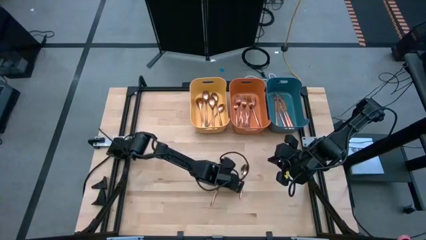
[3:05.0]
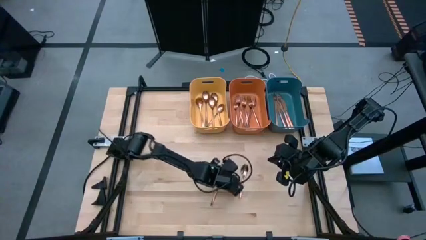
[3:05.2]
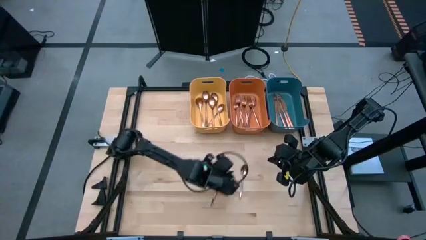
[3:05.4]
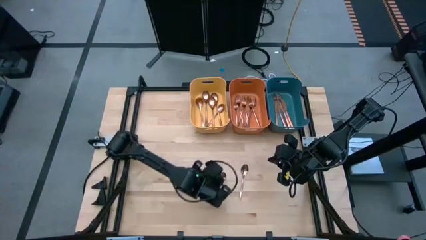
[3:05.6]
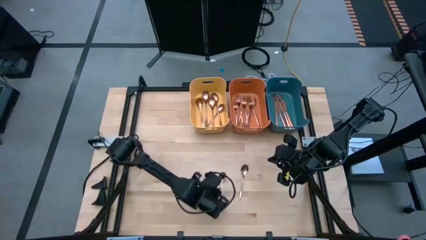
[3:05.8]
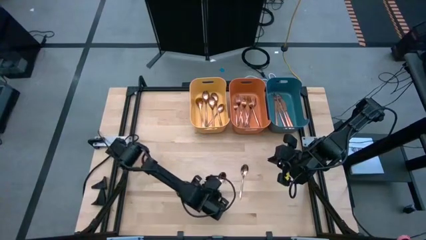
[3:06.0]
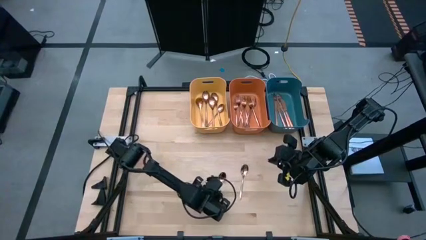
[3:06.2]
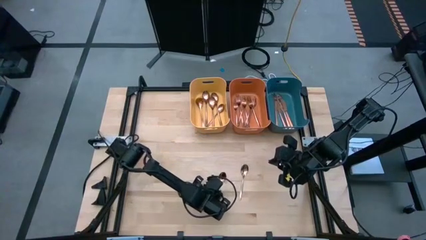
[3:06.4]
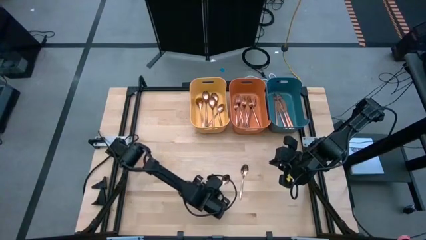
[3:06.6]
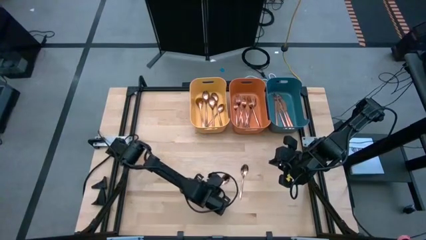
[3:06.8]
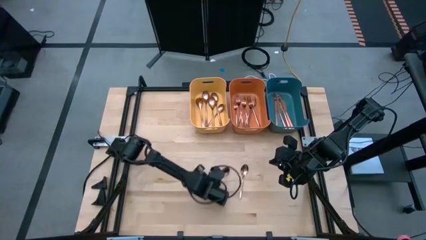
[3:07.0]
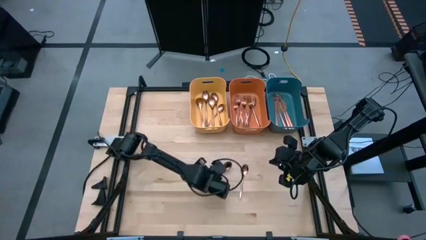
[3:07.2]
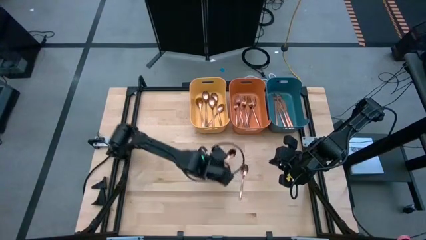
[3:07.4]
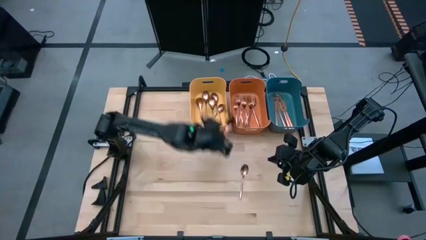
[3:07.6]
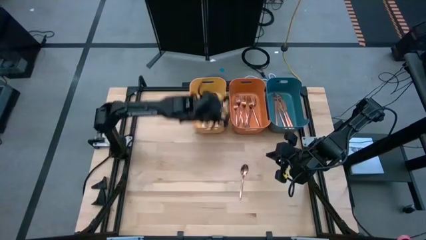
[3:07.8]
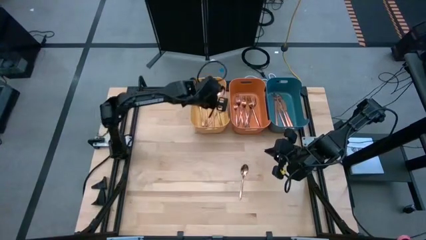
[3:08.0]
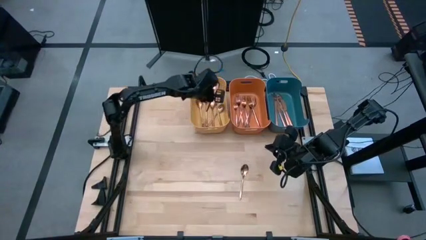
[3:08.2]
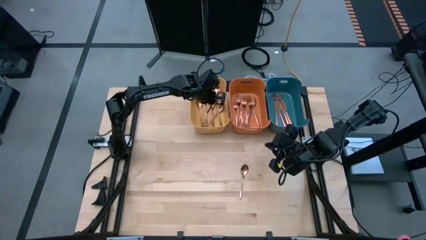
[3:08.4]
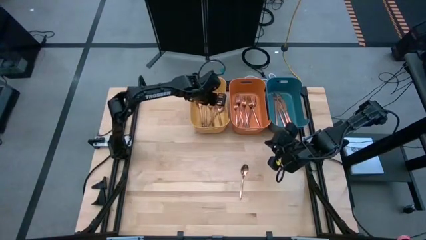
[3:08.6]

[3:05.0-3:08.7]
Task: Sort silverware
Put the copper spoon into the yellow bin

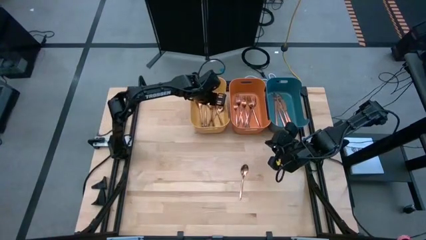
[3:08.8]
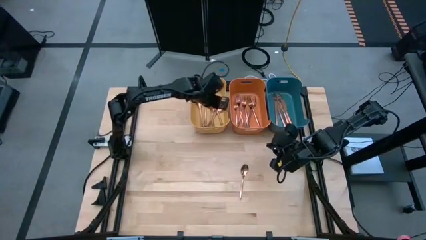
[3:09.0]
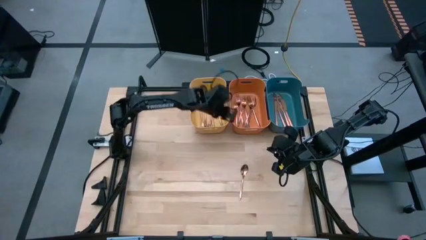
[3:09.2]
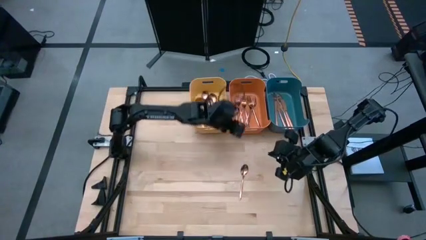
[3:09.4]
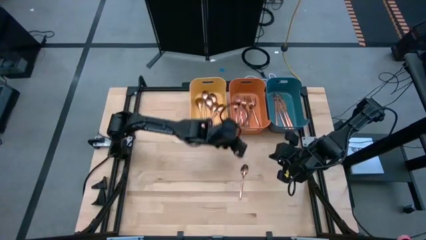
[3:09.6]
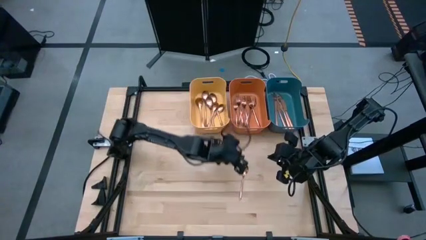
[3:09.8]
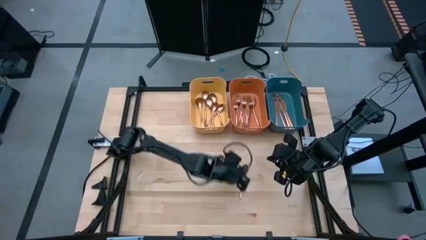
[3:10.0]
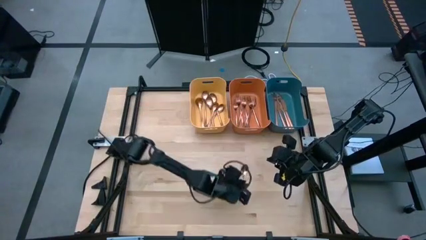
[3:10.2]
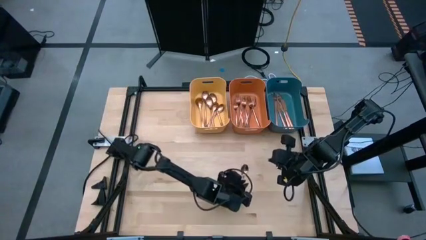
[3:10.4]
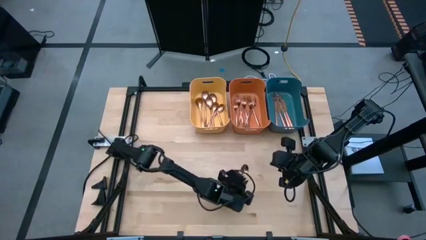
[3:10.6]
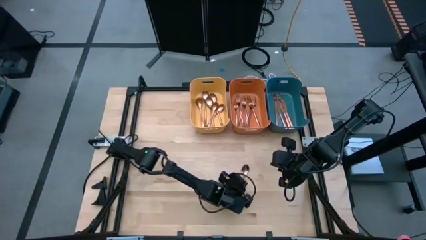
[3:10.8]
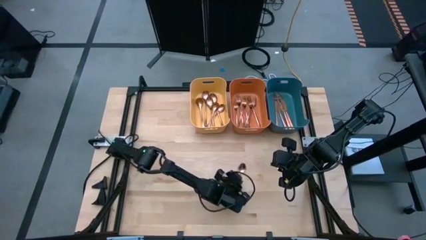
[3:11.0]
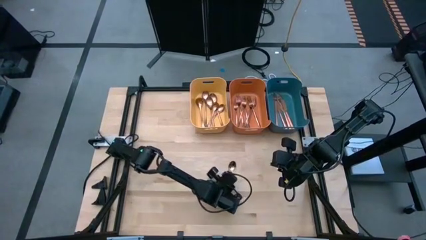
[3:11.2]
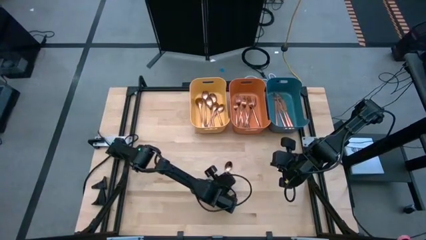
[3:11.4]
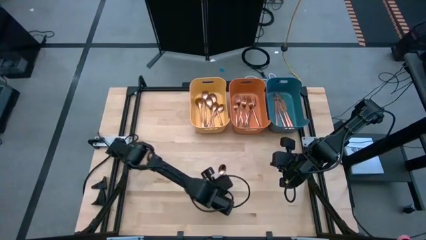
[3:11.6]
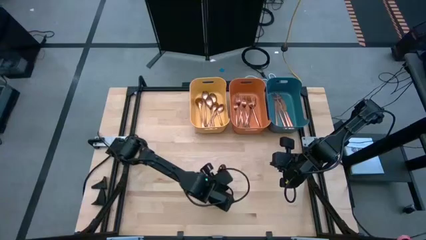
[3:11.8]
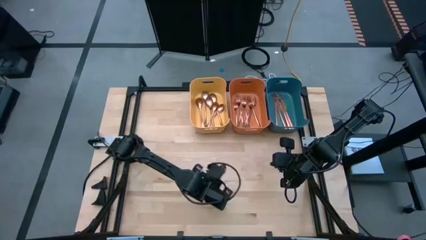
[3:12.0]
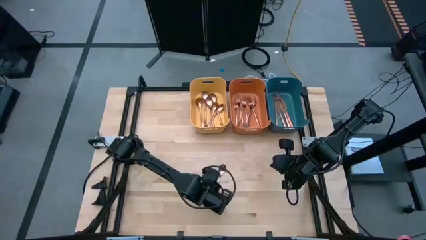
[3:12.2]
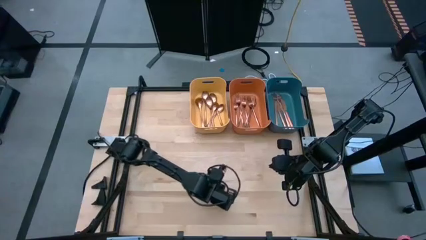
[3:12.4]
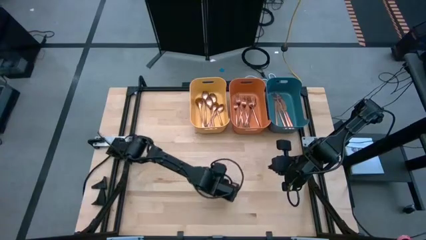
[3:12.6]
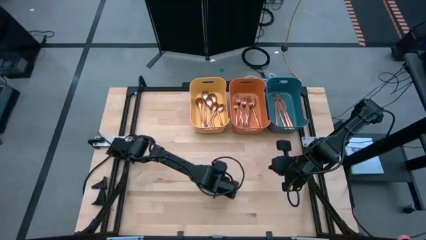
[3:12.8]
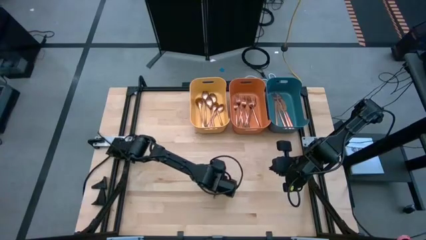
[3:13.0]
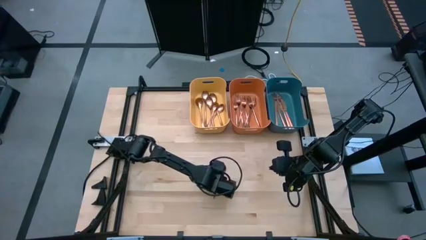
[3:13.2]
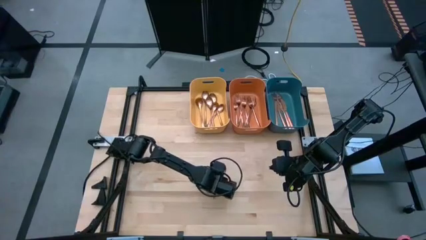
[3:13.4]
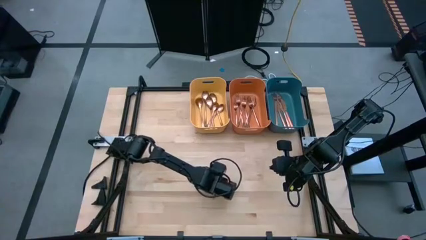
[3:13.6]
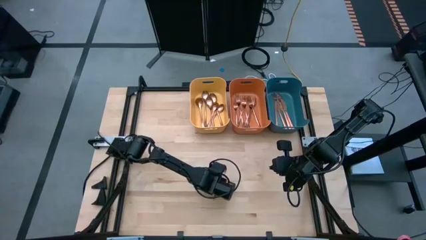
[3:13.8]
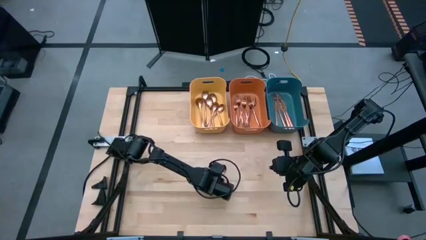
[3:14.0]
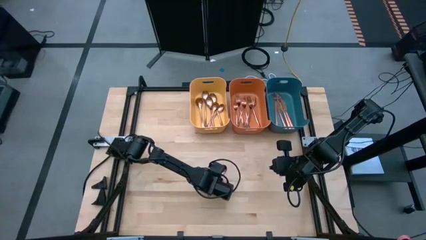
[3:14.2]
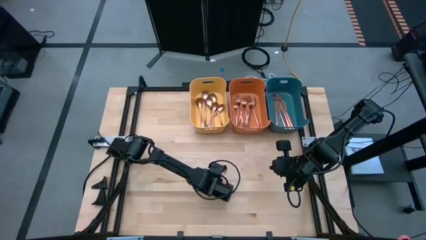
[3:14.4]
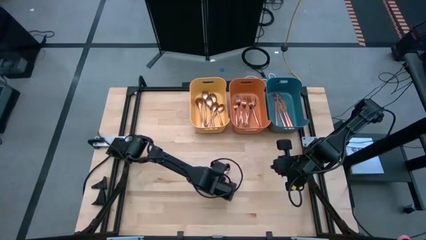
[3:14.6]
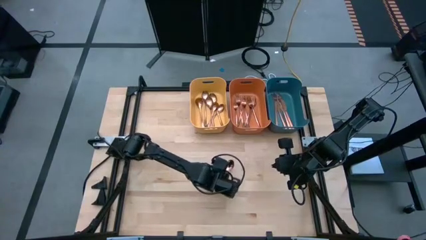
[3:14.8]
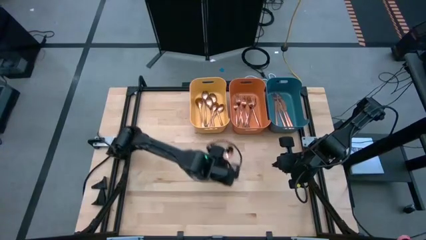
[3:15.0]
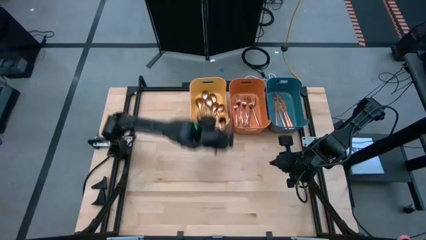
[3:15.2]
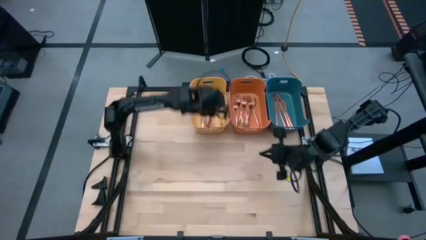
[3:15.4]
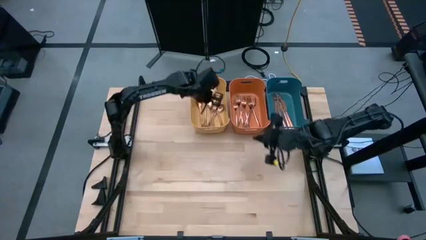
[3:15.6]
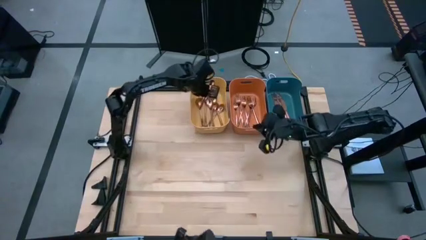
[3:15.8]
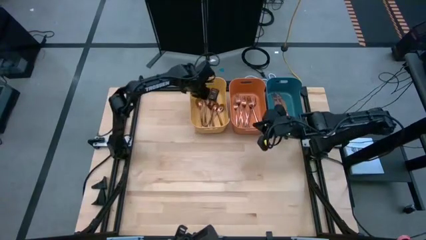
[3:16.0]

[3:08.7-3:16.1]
Put the copper spoon into the yellow bin

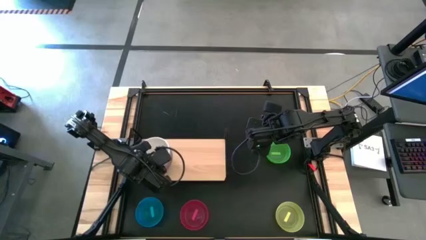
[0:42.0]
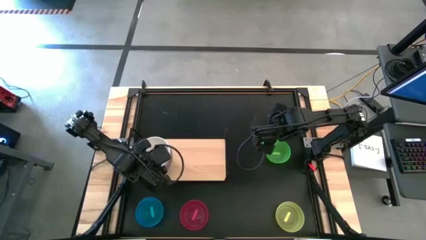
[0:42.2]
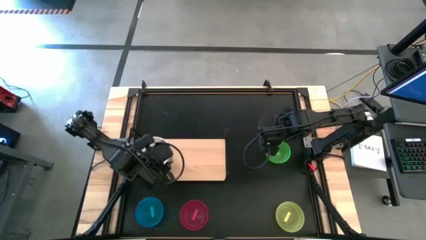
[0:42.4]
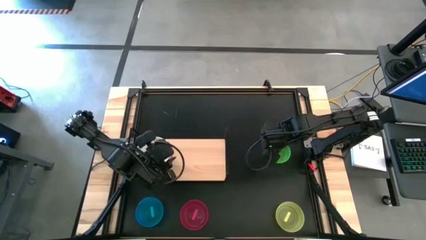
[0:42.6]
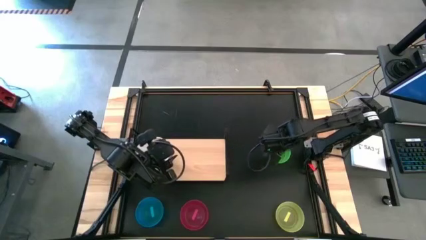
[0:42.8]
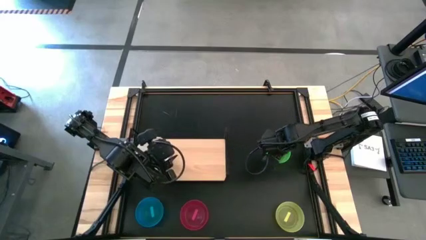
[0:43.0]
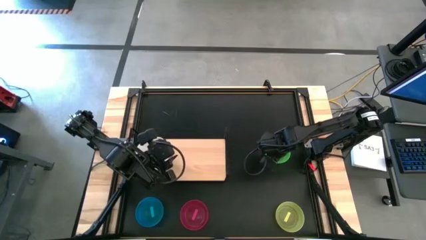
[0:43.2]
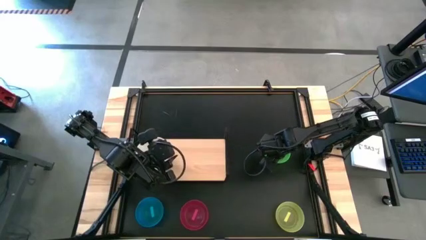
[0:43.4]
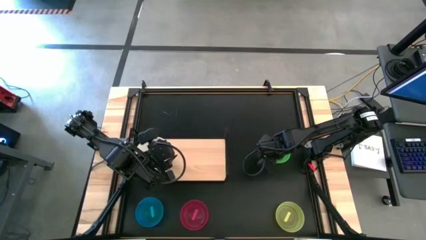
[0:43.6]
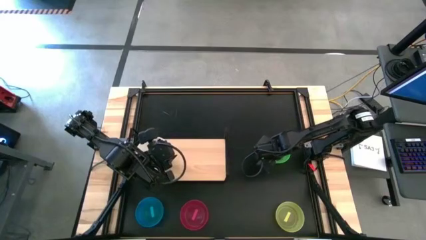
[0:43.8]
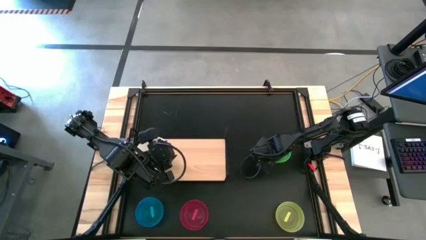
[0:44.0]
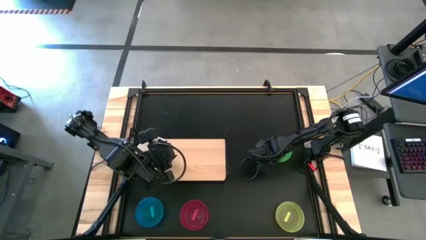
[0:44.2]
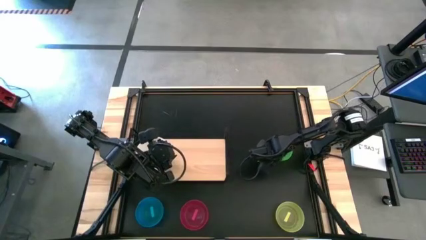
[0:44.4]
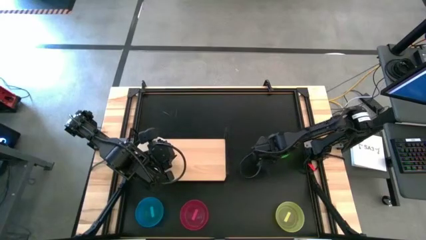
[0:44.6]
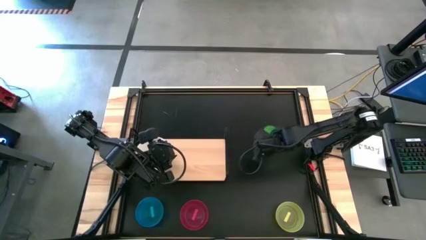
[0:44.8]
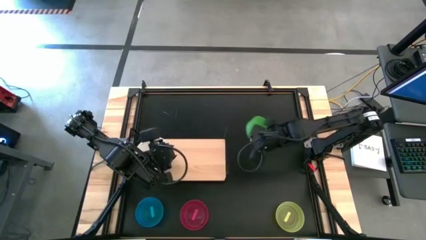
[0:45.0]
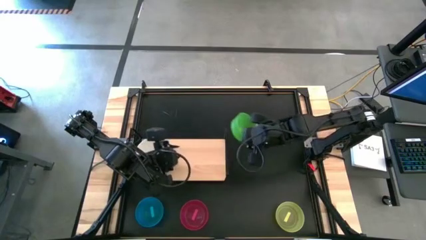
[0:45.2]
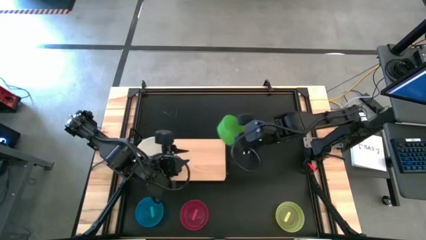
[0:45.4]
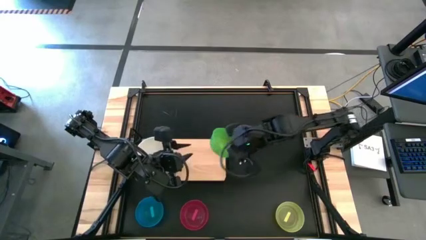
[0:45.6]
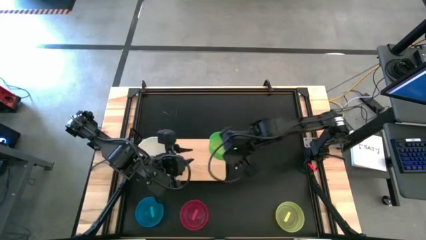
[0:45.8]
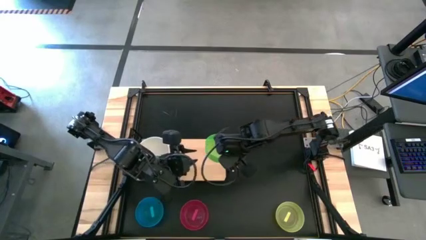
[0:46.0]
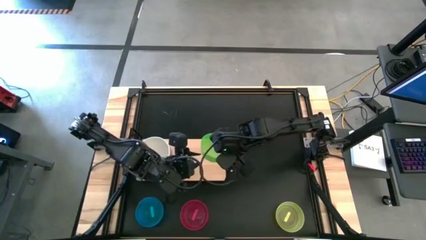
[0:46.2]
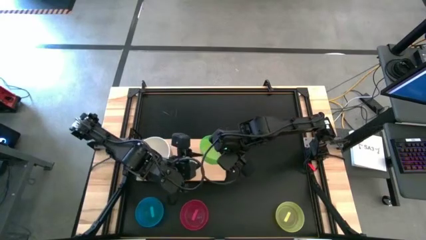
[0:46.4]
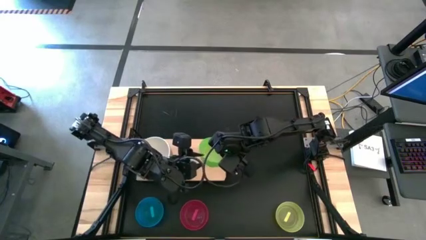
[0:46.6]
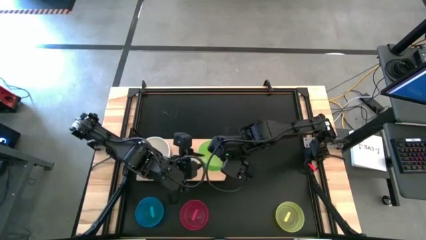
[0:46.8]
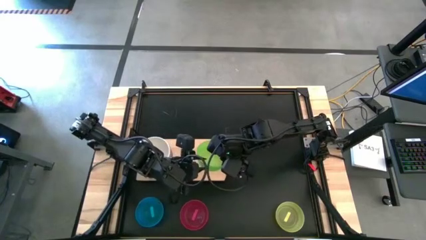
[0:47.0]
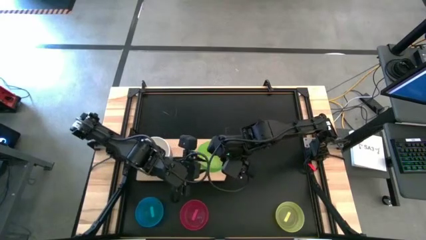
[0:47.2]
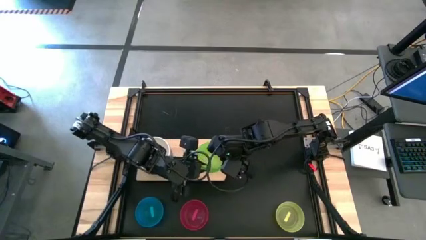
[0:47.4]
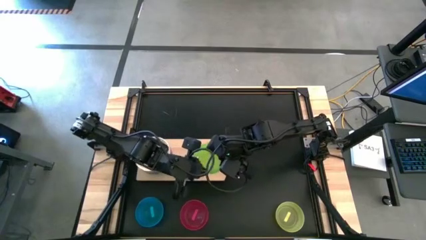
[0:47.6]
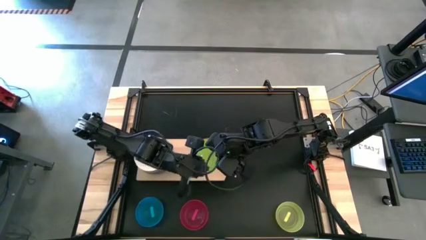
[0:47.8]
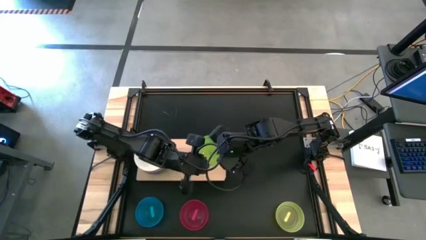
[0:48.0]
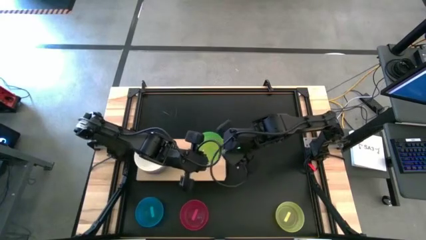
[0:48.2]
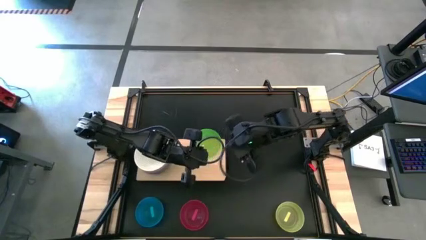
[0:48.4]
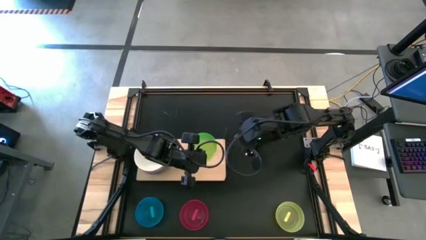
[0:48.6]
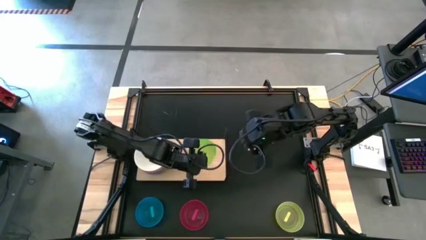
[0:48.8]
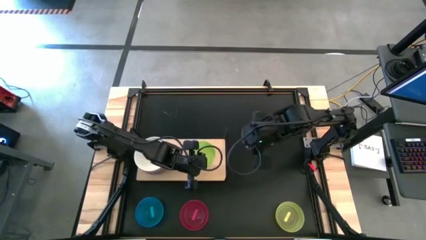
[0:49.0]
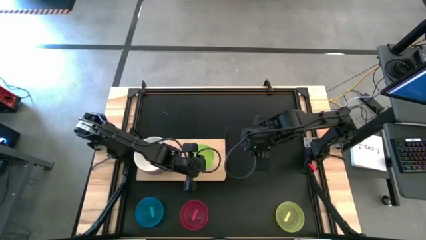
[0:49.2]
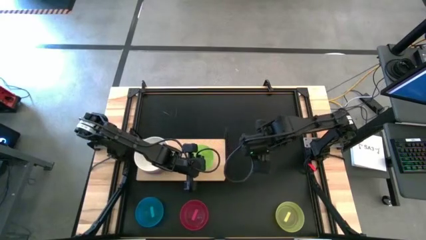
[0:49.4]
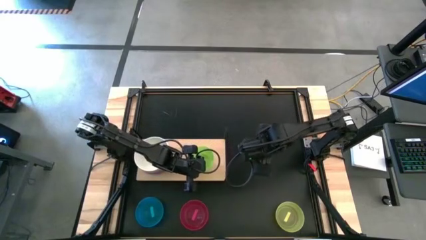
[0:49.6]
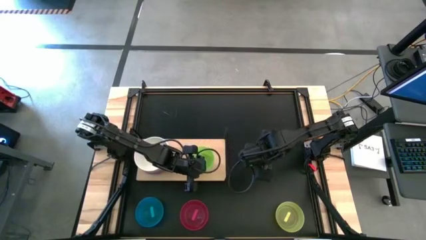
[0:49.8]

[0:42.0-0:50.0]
Task: Place and stack bowls onto a shelf
Put the green bowl on the shelf
